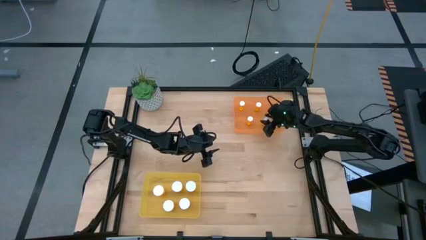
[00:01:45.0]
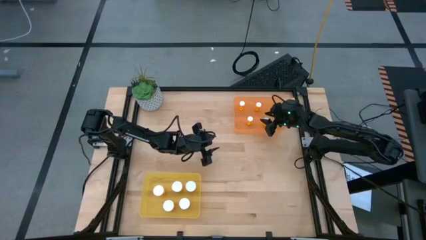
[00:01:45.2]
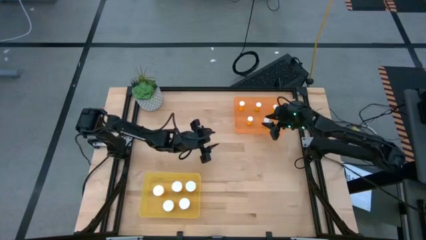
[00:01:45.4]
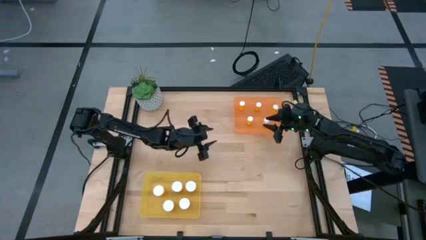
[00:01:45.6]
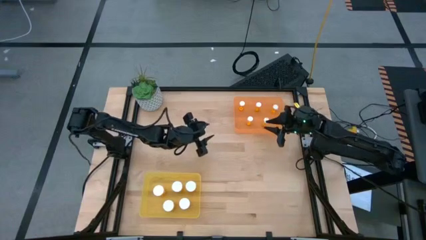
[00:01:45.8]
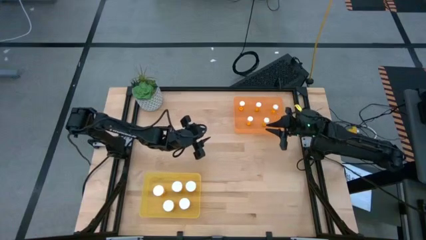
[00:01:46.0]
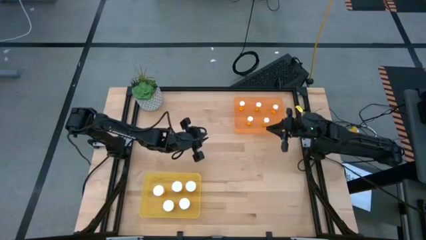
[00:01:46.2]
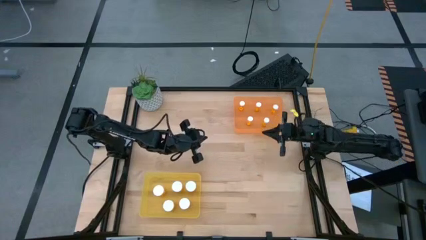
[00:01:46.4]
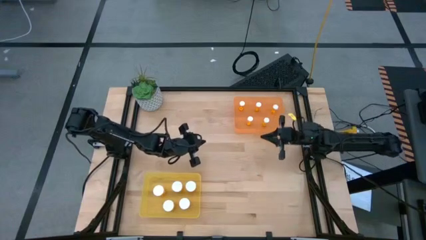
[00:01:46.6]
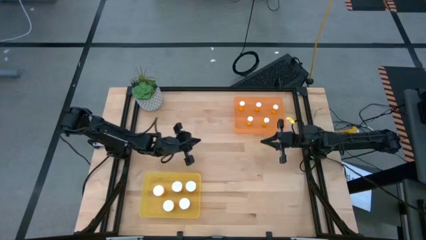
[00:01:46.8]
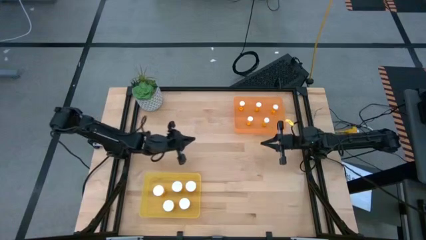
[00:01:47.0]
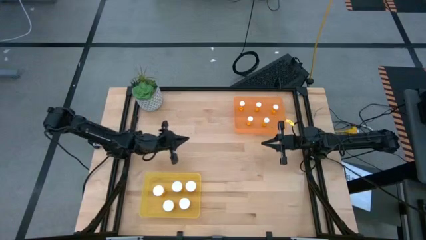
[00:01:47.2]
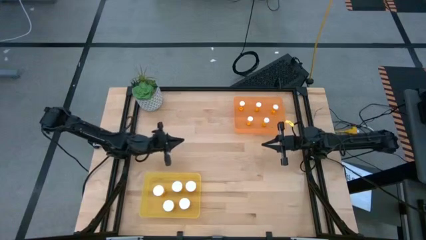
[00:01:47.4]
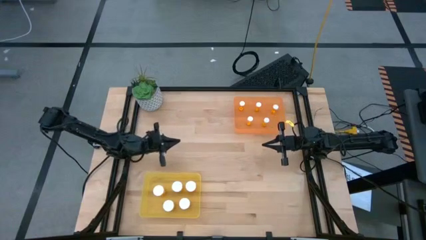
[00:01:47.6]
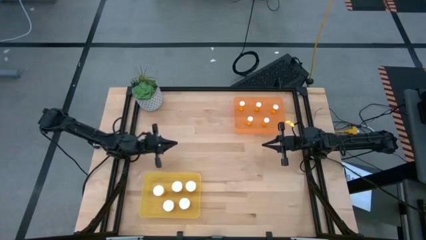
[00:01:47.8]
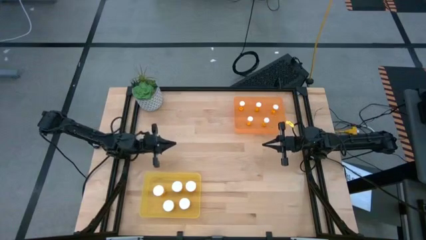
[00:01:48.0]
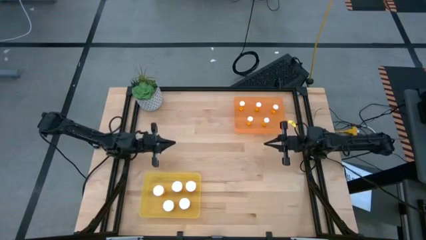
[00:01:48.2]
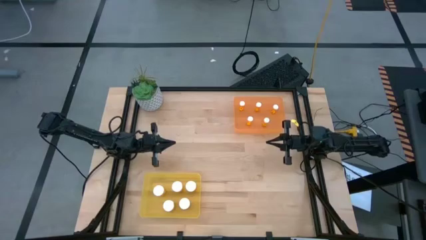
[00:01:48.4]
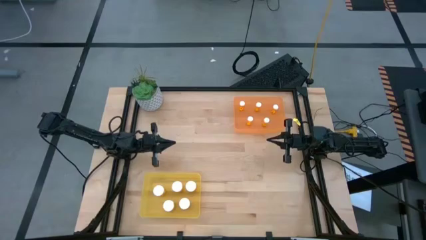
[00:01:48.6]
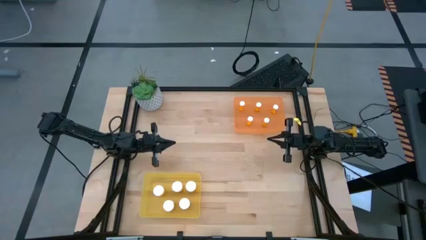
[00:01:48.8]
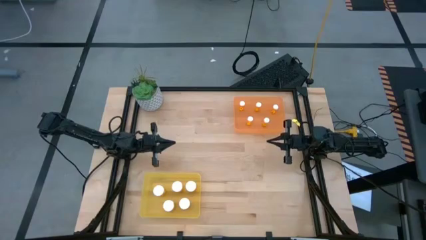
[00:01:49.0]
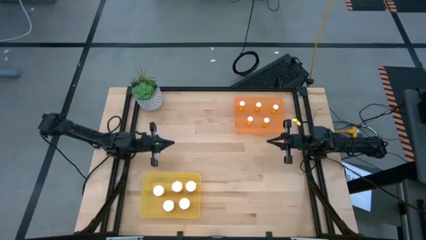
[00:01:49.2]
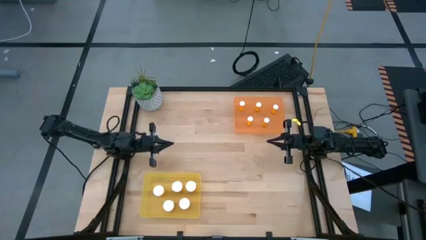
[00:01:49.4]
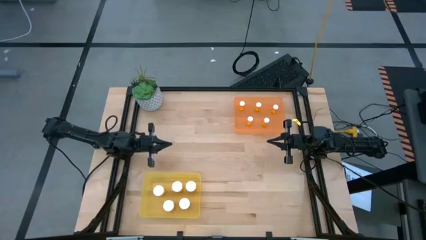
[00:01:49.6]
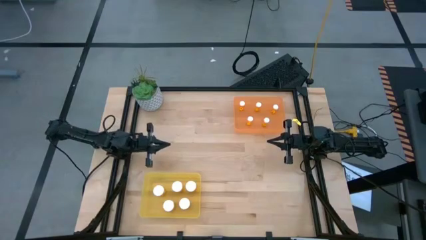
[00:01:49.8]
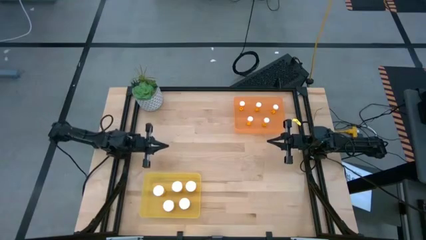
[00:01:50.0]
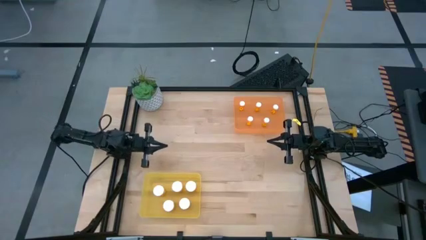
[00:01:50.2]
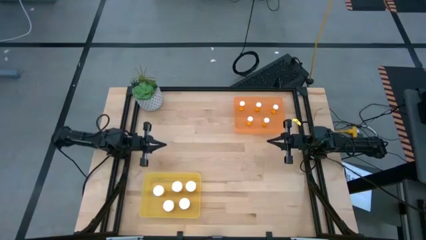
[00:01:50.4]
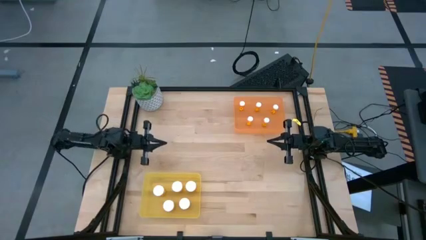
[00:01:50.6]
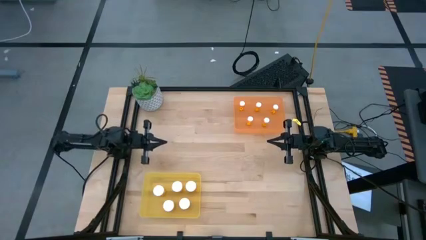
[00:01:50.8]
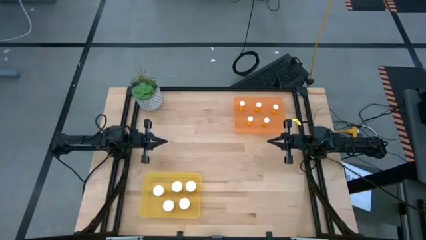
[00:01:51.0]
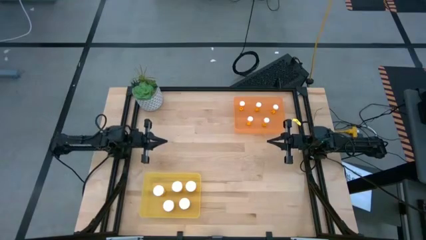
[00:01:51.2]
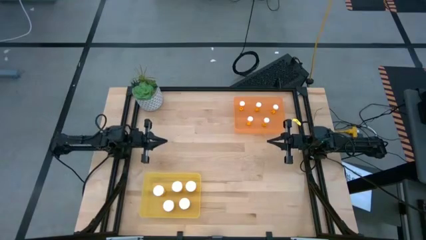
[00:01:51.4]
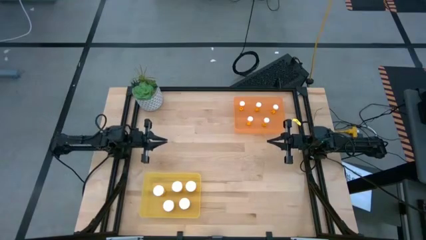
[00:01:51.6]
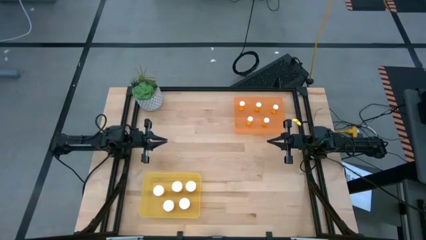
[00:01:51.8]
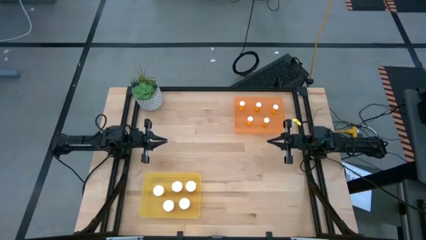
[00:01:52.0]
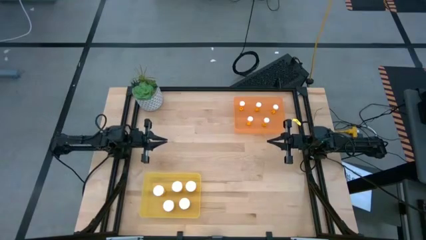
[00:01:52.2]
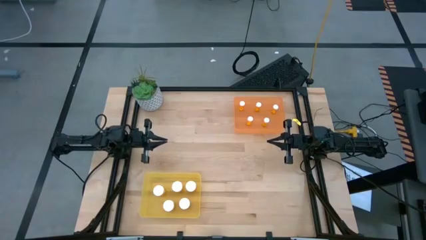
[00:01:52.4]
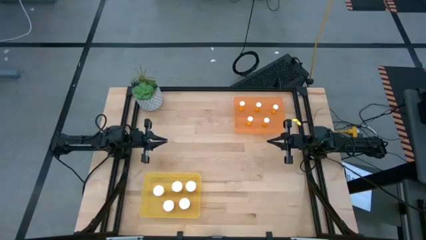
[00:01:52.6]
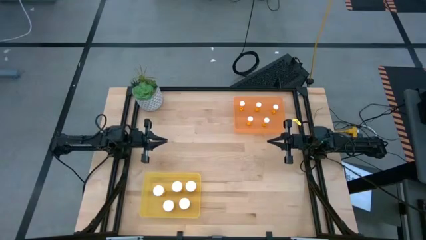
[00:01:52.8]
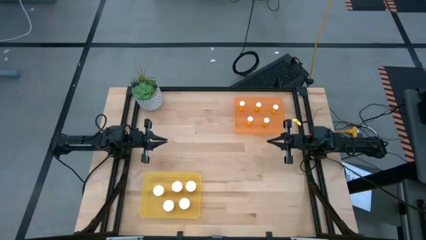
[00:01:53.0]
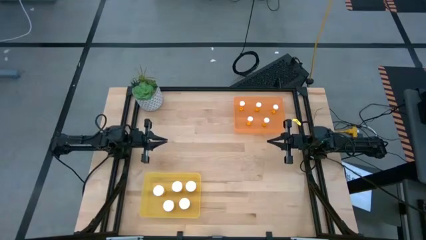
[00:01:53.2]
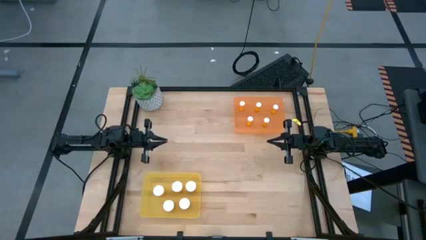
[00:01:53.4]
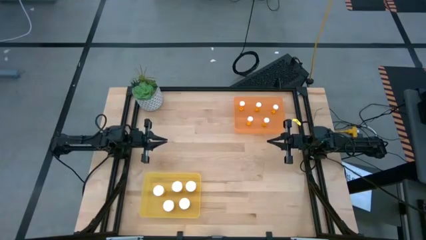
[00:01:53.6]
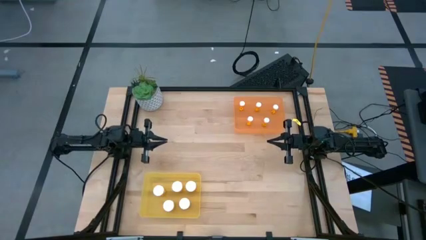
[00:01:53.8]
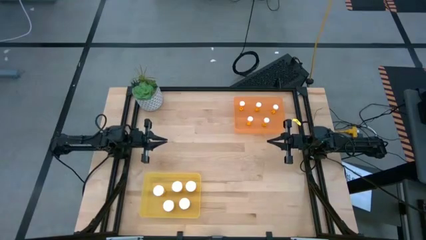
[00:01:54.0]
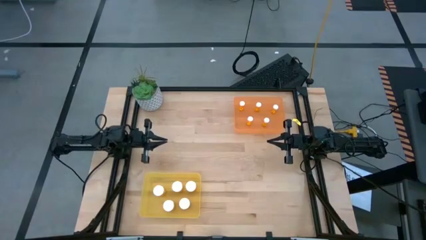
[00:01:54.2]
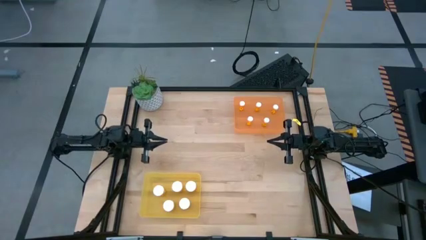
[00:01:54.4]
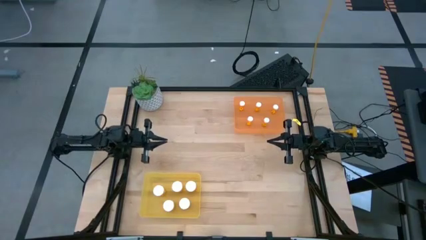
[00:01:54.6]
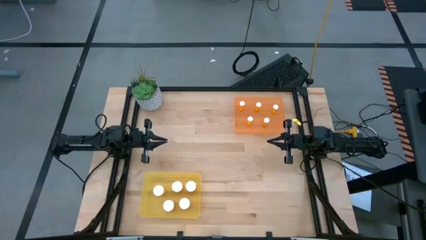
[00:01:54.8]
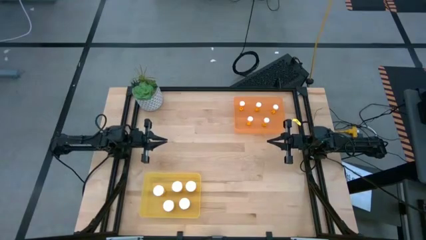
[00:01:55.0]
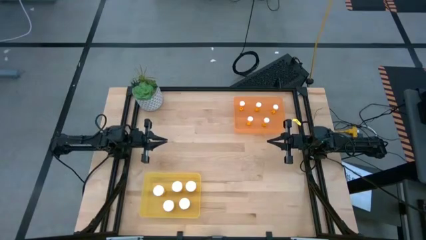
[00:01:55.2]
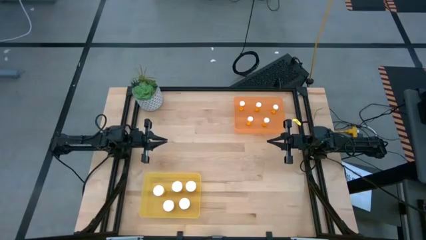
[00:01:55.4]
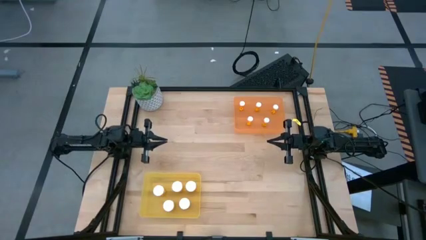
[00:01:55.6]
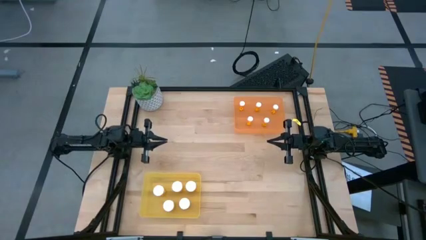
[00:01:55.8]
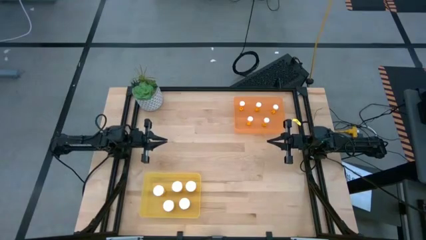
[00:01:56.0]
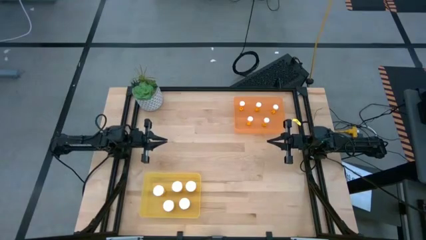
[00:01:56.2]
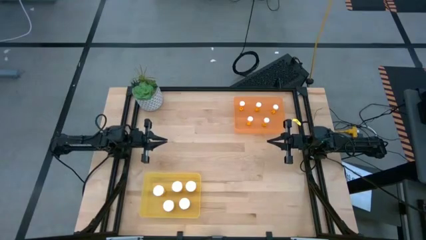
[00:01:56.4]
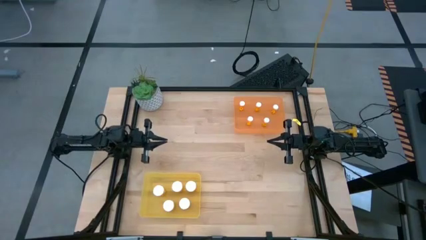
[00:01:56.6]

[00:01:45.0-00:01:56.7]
Task: Pick and place medicine bottles into bin by pill shape (circle, oval)
Return to Home Position

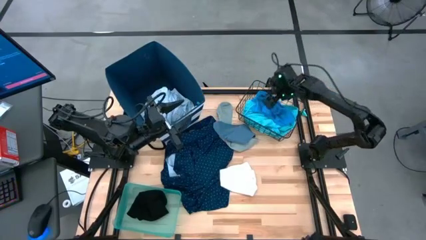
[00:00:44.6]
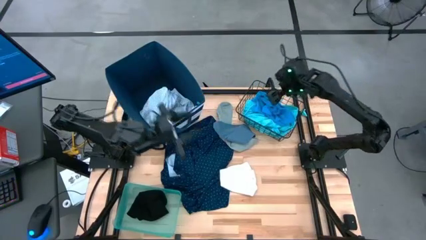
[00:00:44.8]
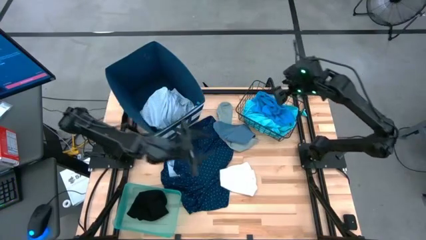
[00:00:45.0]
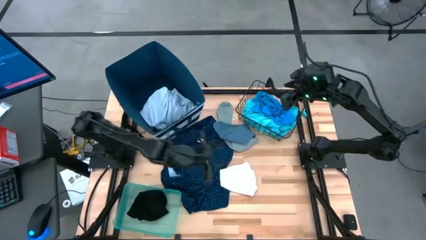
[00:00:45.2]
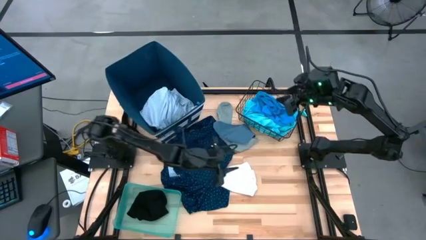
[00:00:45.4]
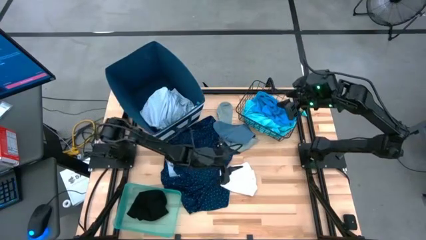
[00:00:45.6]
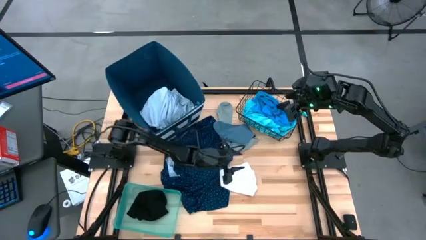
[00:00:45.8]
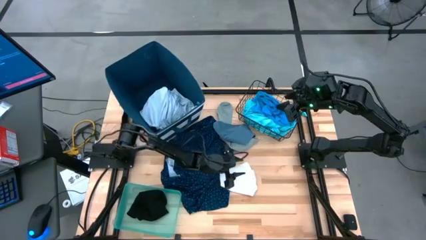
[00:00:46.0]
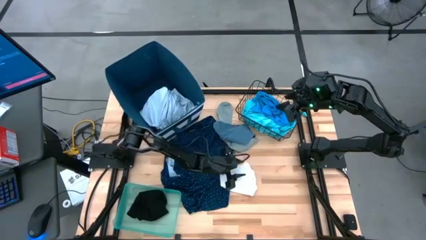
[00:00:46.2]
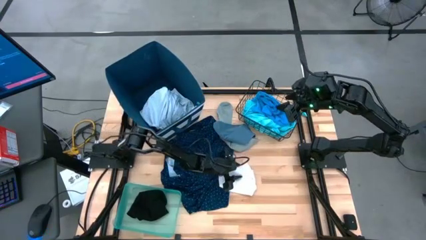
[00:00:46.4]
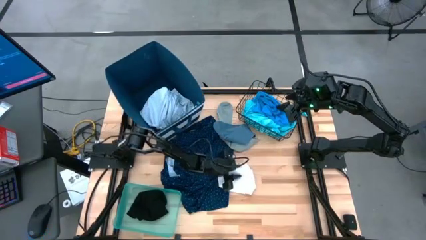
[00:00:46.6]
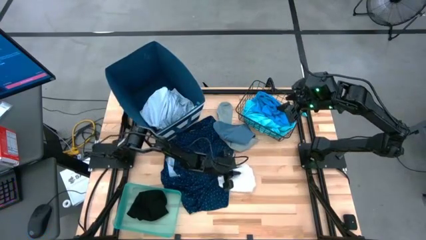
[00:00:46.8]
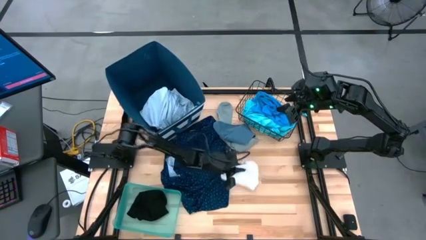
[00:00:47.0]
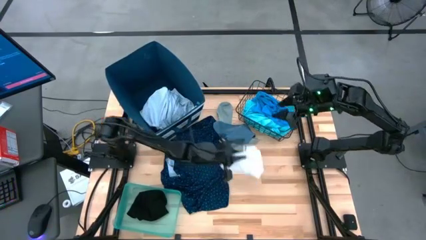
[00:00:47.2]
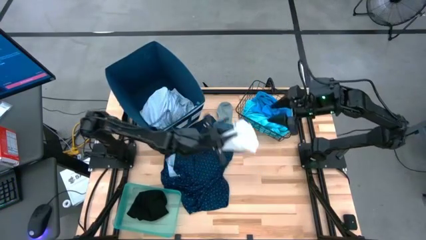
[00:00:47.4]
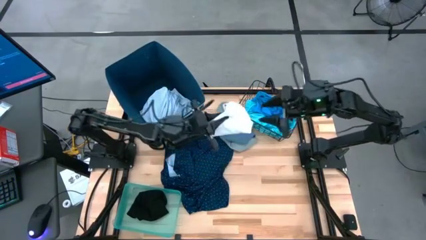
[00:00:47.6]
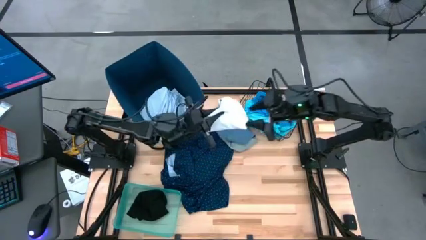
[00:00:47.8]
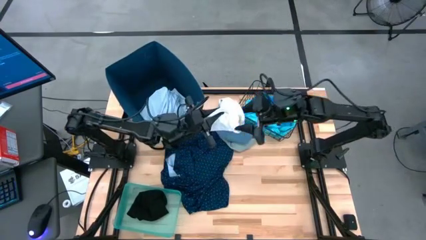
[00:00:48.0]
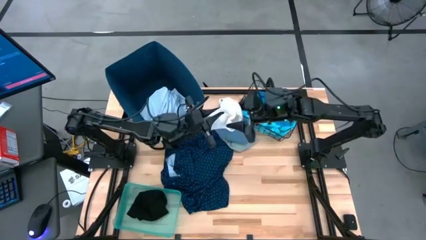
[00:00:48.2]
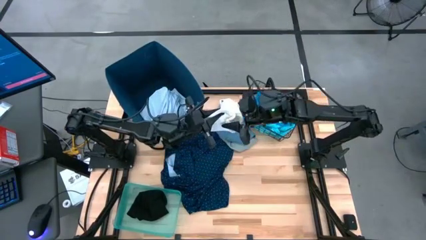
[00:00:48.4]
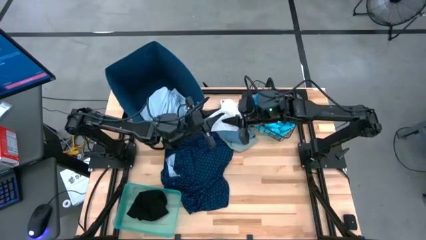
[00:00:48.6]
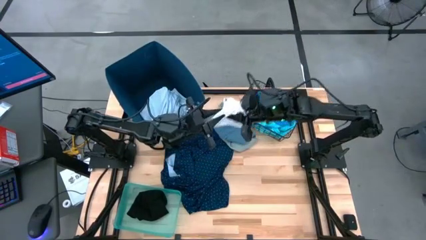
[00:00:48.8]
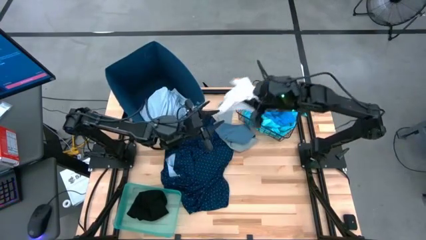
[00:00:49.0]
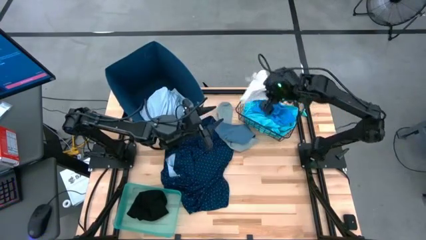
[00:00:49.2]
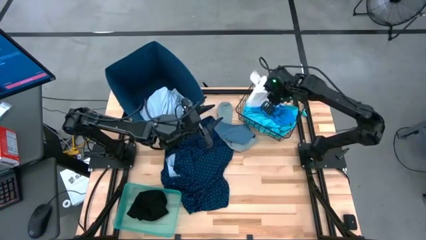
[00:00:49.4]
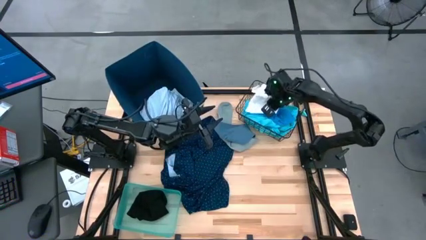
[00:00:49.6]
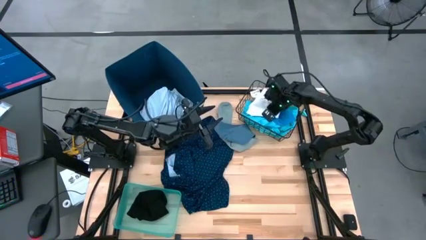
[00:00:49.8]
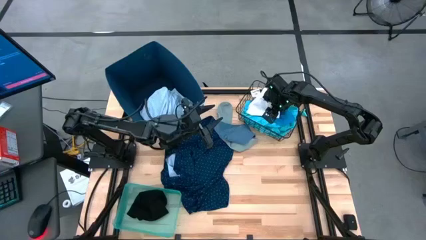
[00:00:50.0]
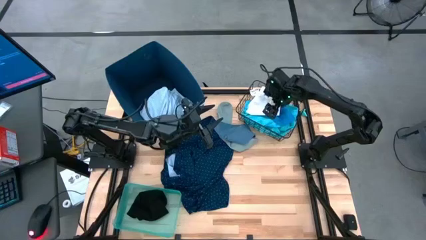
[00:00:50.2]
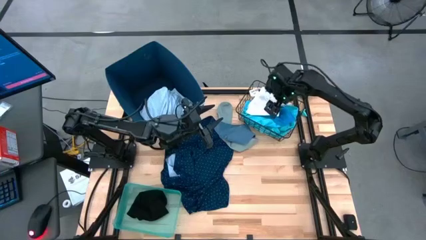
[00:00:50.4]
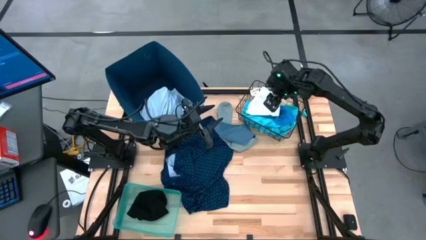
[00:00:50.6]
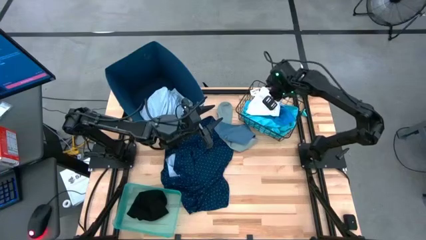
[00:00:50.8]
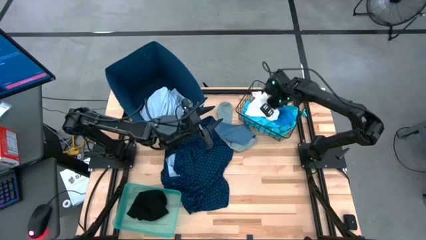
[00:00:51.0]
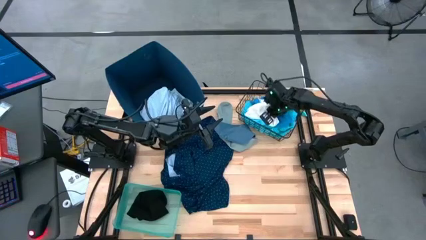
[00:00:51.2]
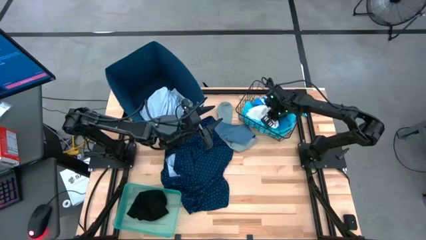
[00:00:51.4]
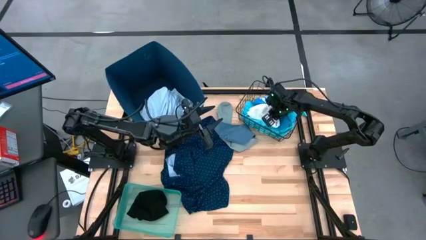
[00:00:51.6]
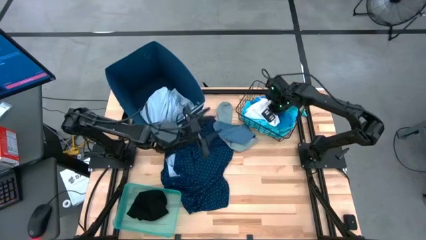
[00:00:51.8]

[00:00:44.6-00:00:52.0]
Task: Pick & Place Cloths
Put the white shorts into the black wire basket
